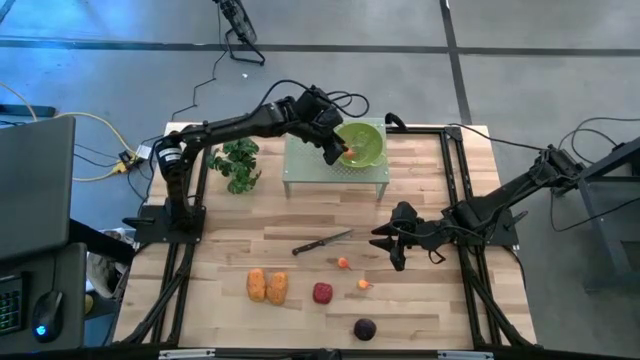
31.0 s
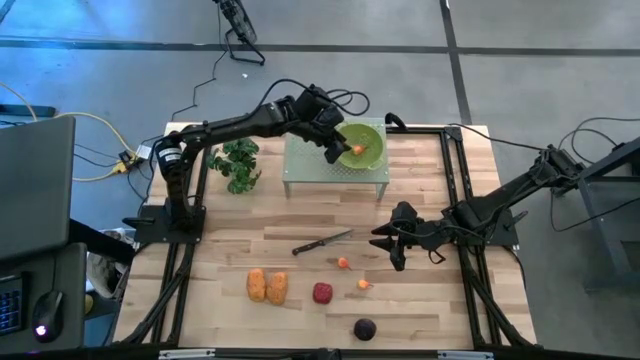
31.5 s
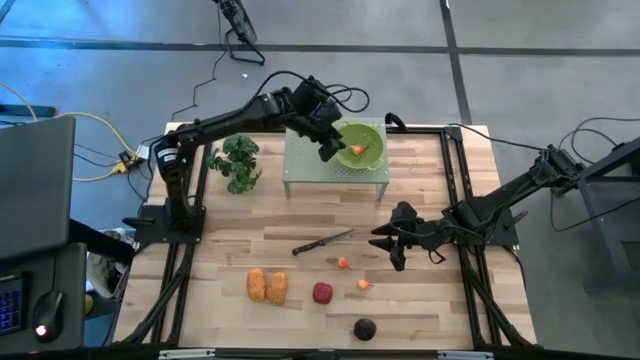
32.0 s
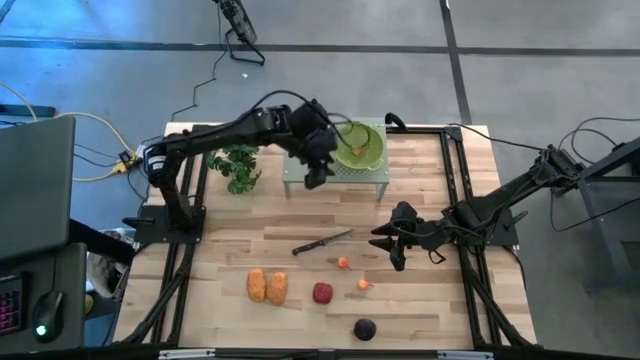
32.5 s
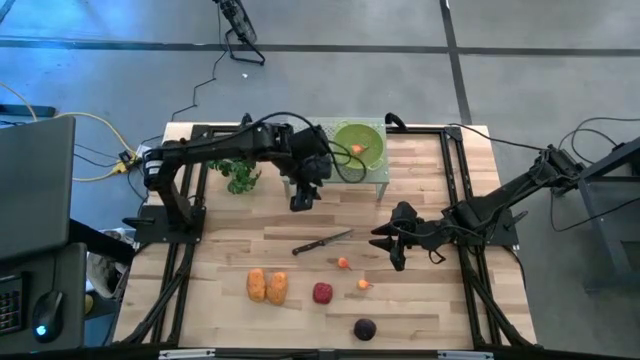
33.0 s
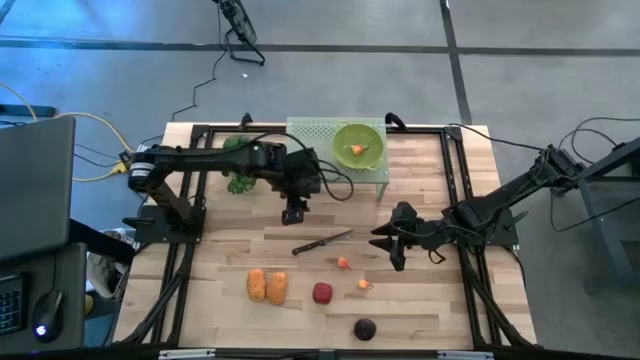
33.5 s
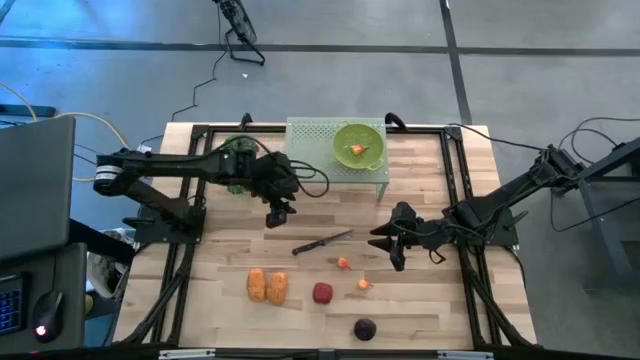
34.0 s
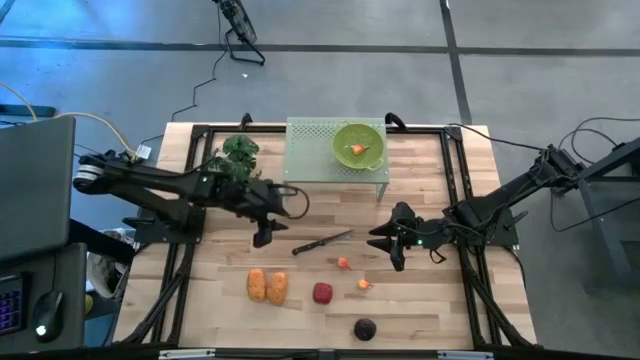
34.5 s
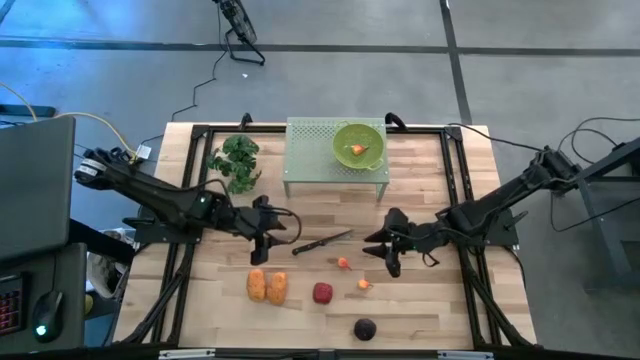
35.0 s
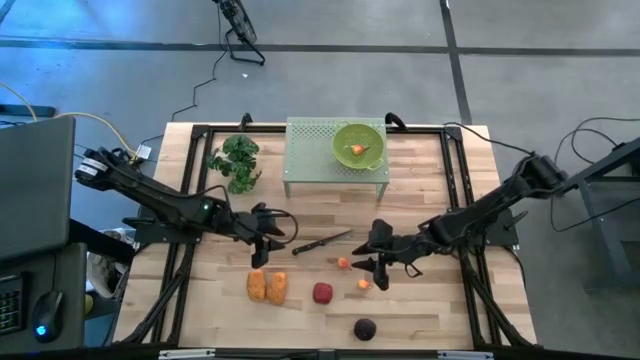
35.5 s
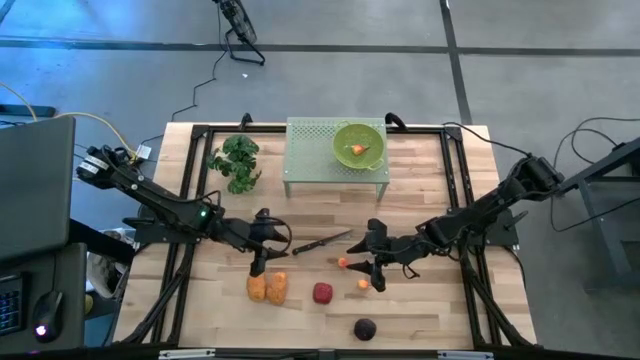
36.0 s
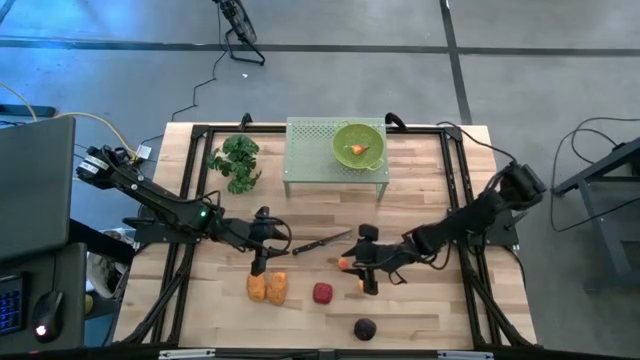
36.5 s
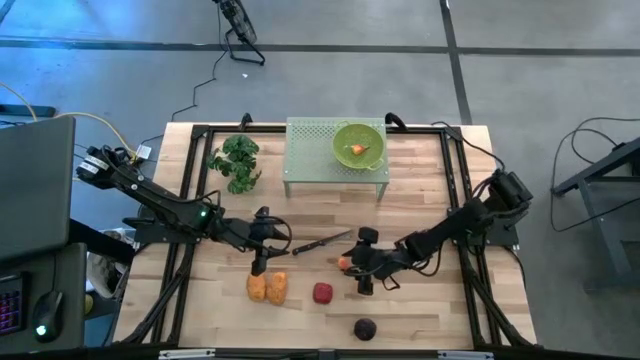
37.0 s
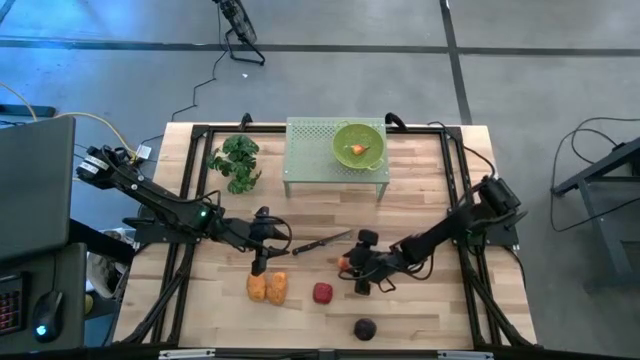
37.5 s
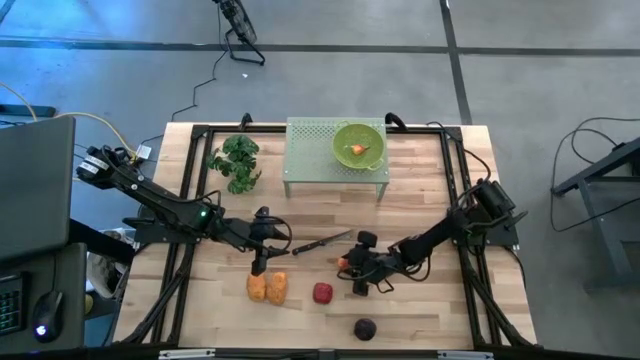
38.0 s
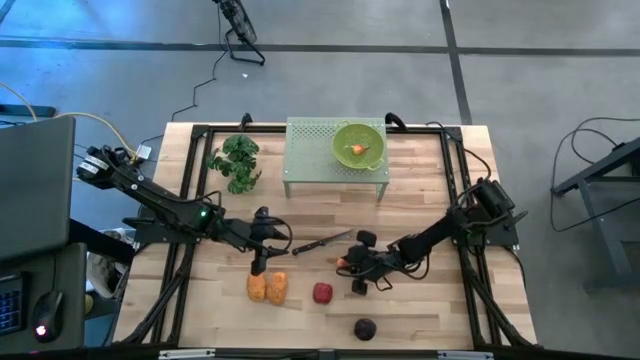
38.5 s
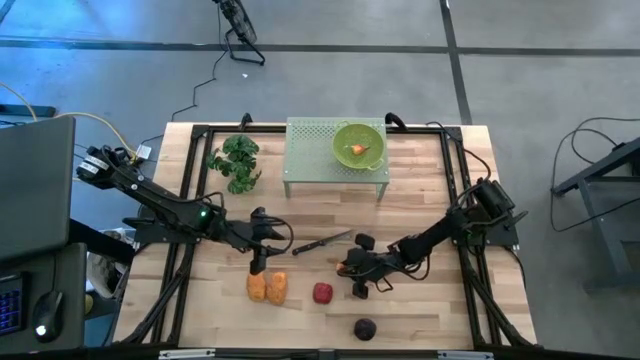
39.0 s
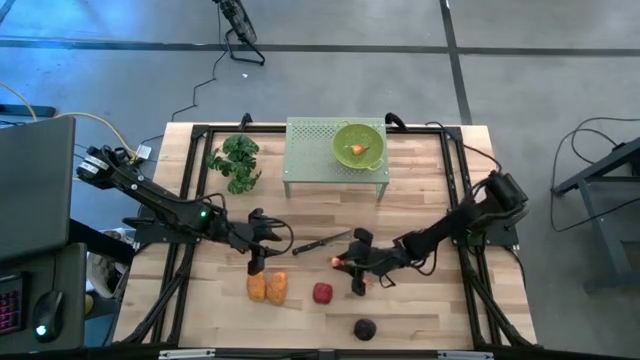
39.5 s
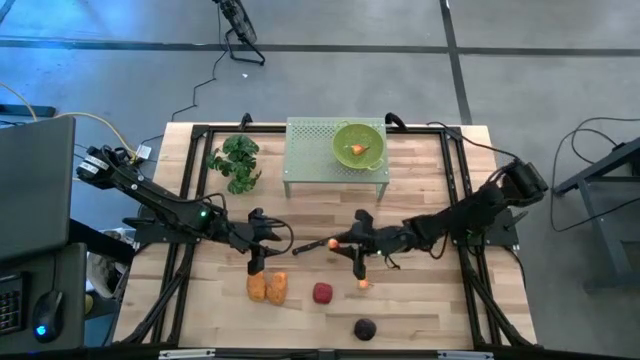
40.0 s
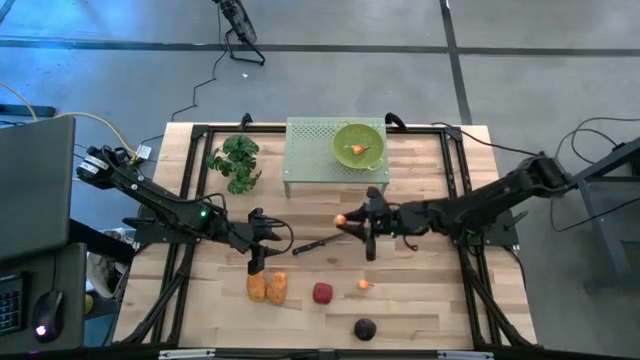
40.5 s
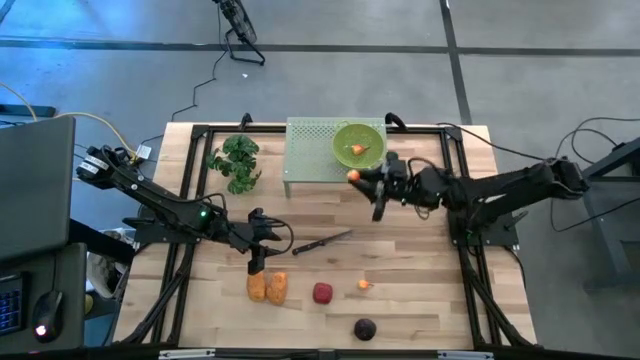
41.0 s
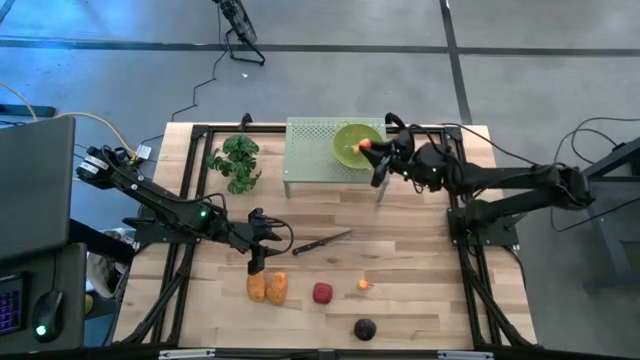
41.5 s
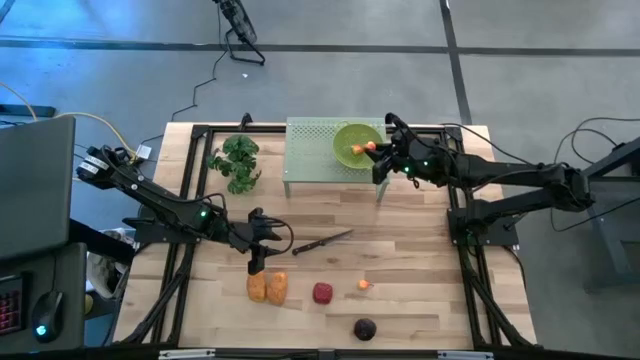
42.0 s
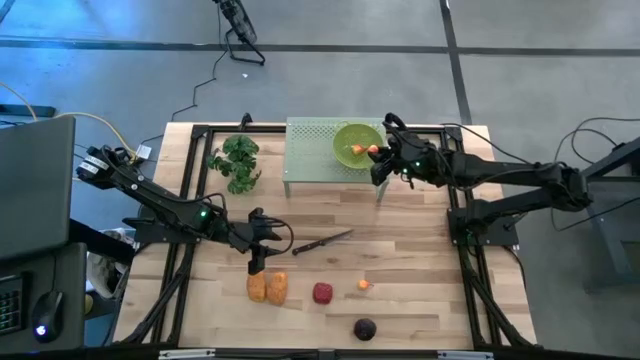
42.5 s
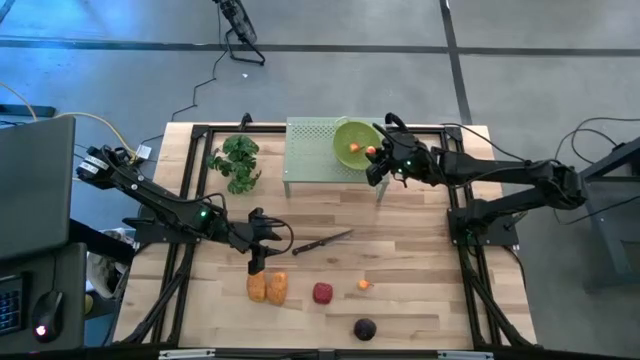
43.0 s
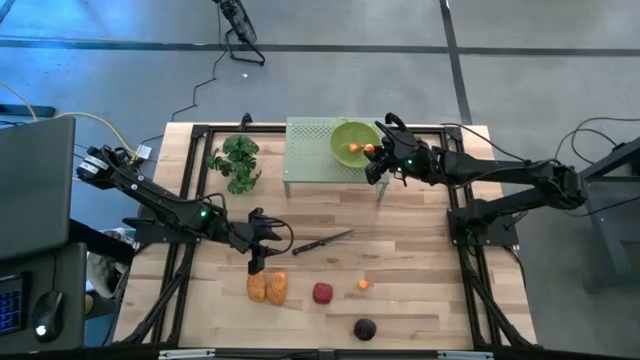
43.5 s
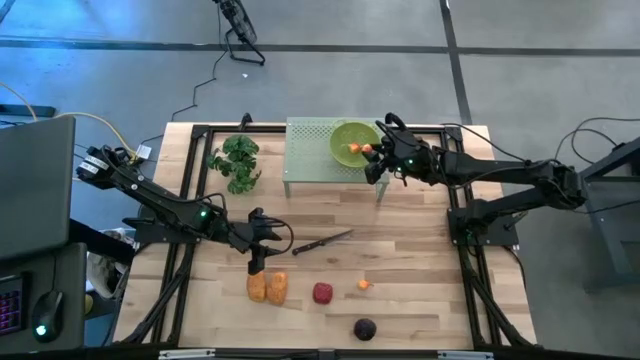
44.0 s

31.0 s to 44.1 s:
Task: Pick & Place Fruit
Put the orange peach into the green strainer bowl on the shelf

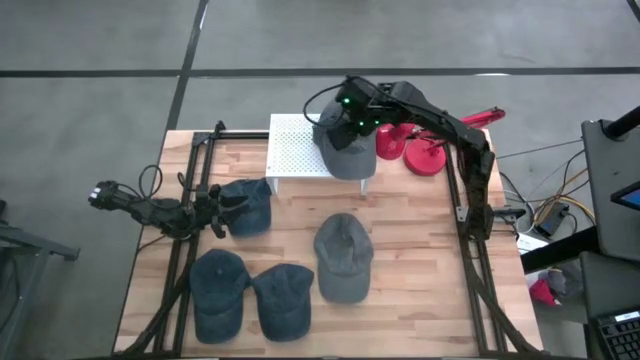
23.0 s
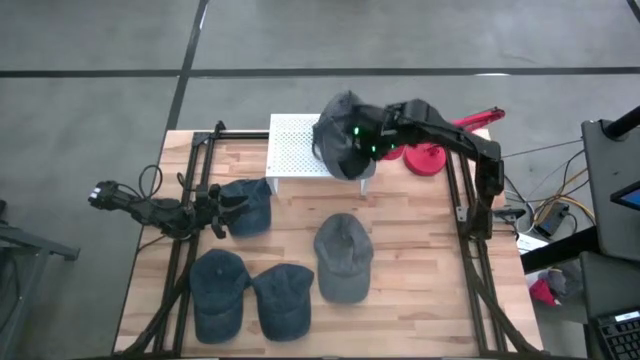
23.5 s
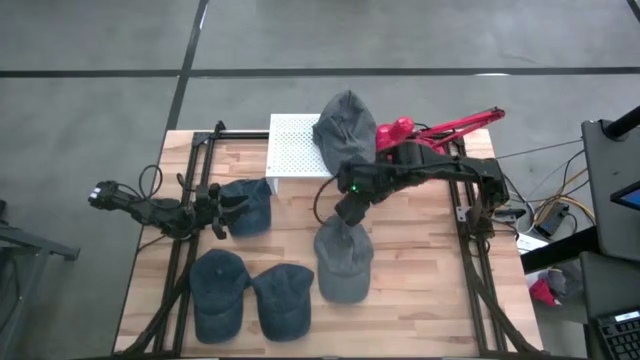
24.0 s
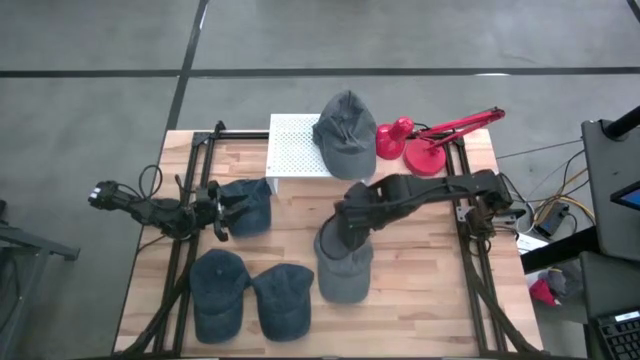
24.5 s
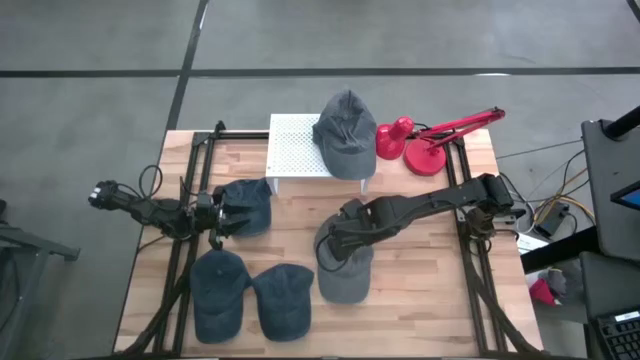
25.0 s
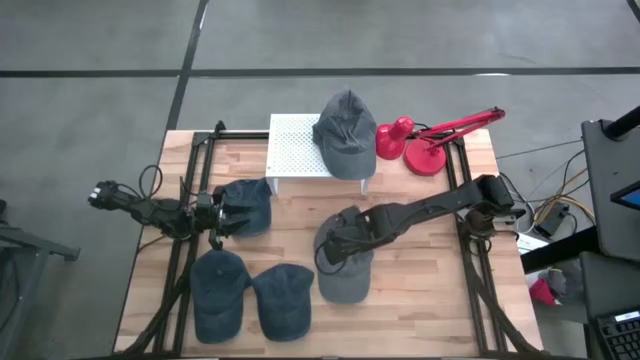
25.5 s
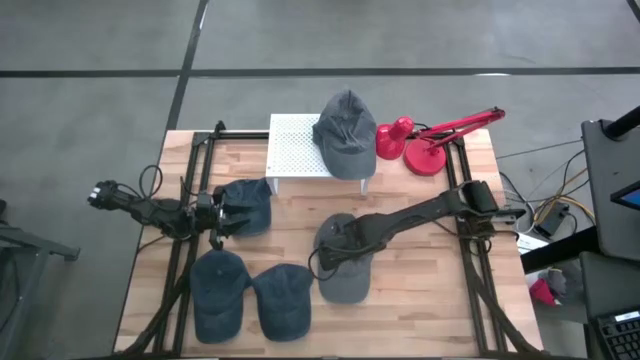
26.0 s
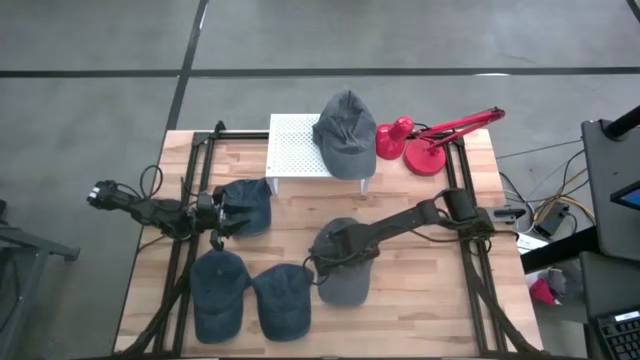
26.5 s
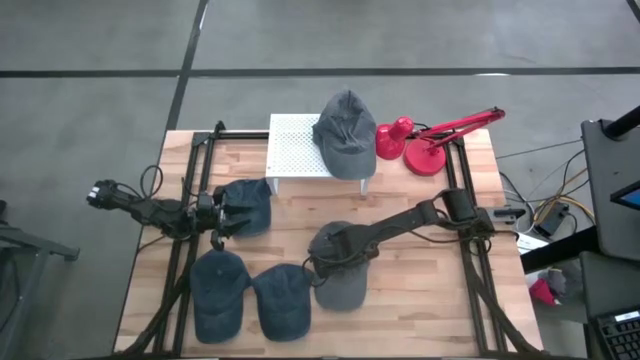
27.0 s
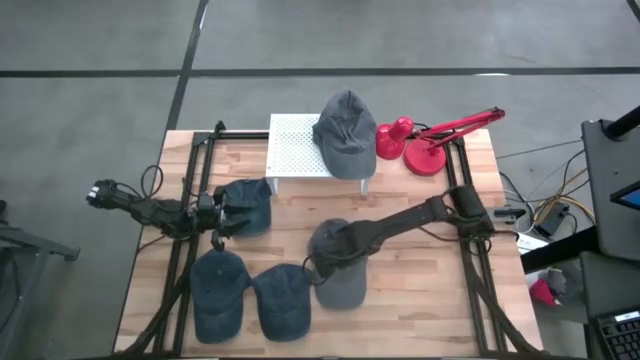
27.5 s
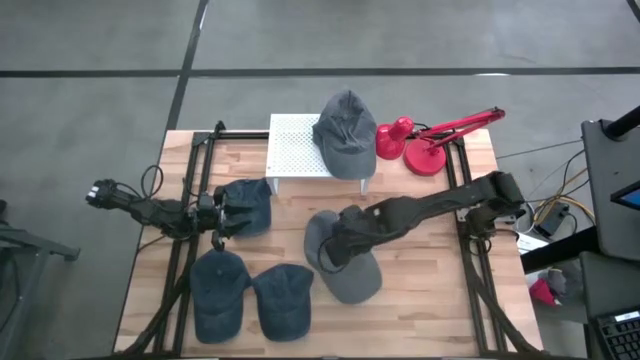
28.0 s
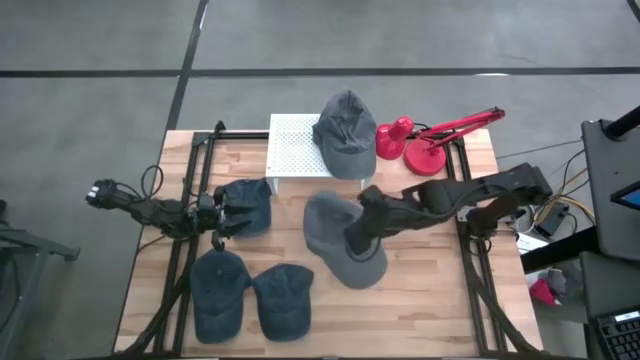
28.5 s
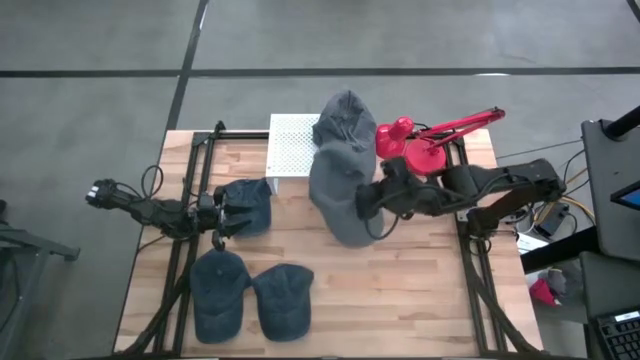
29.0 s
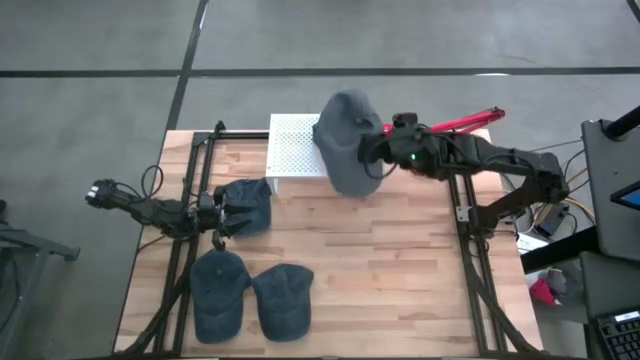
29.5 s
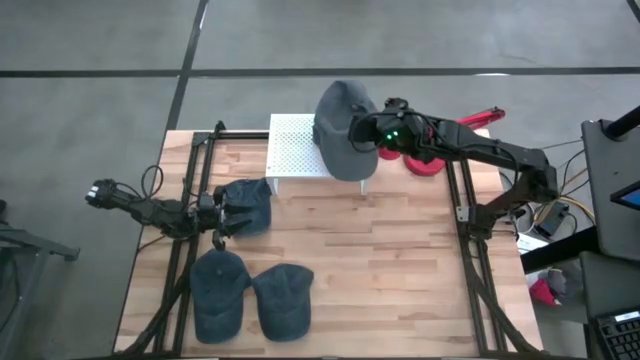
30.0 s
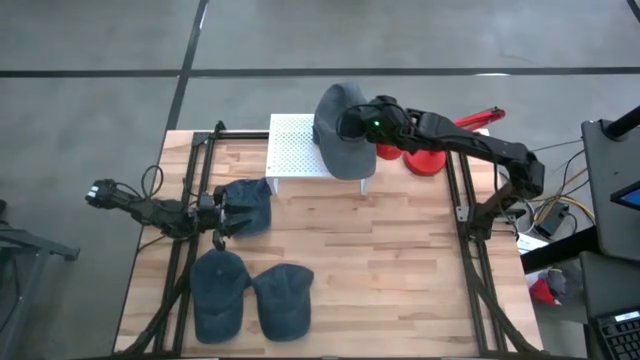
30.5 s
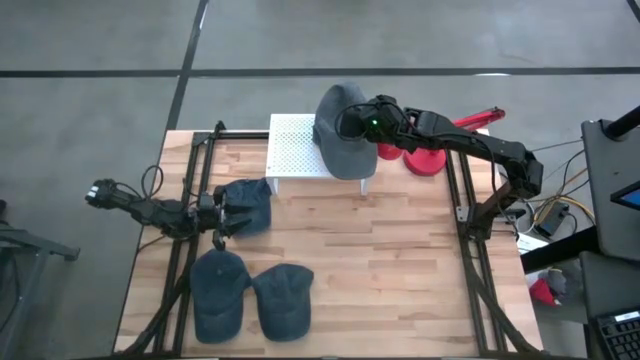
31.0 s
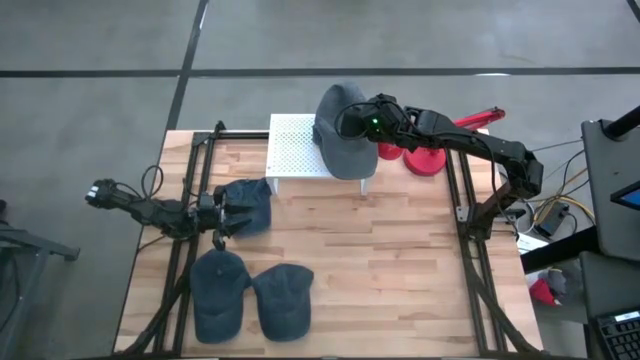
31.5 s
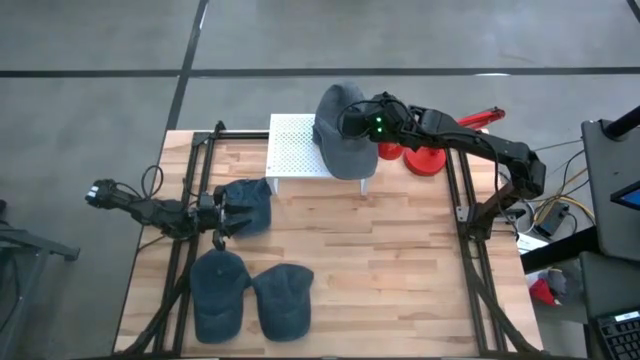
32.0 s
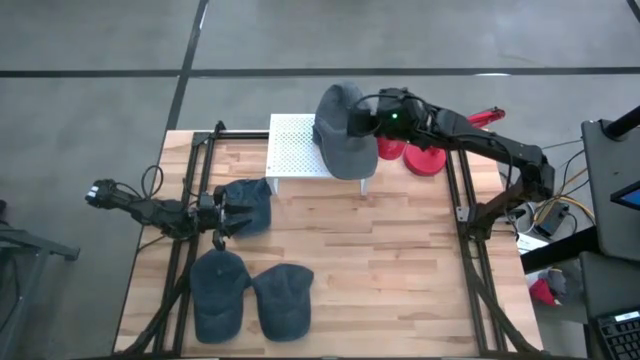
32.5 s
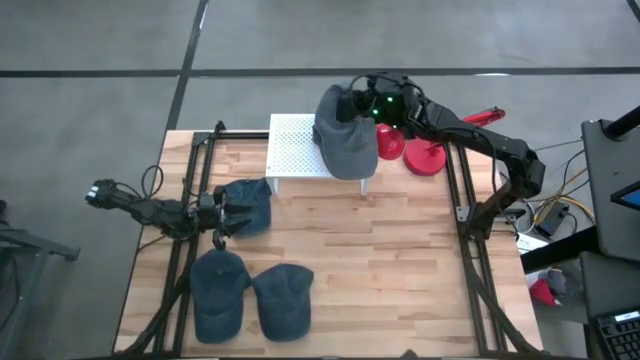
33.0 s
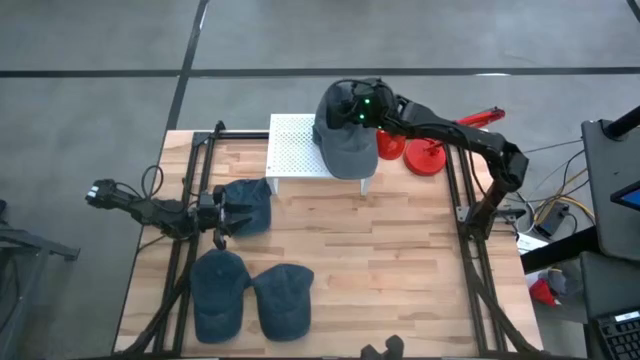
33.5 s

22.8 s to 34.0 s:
Task: Pick & Place hat
Stack the gray cap on top of the other gray cap on the shelf
